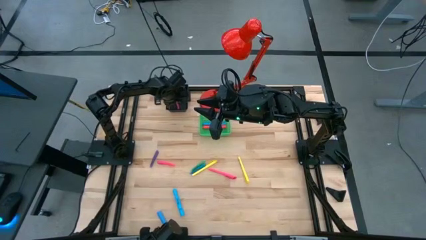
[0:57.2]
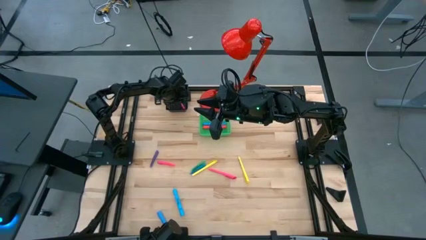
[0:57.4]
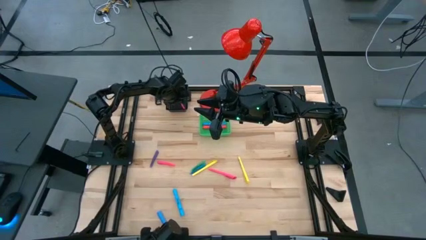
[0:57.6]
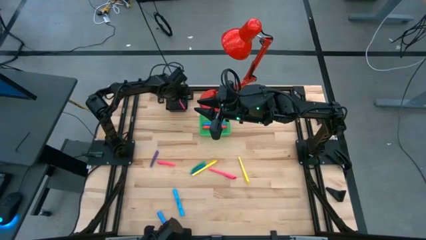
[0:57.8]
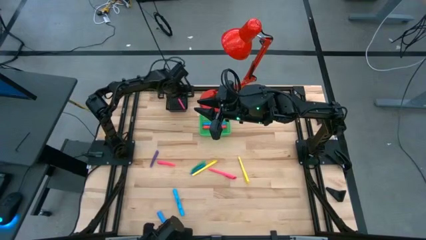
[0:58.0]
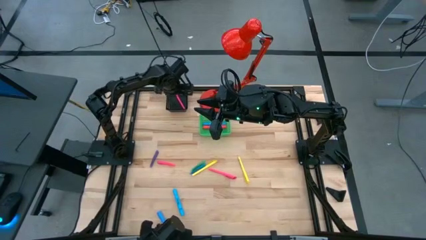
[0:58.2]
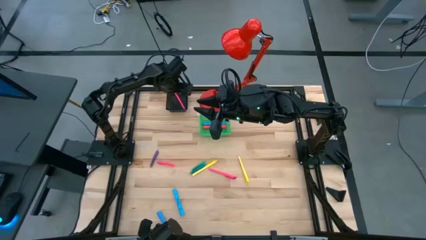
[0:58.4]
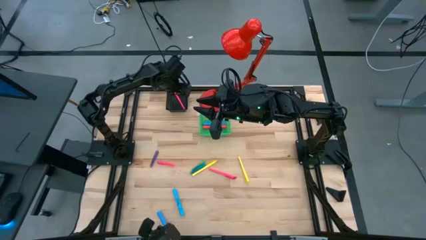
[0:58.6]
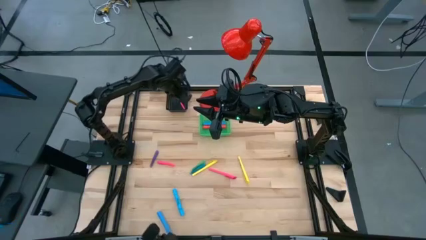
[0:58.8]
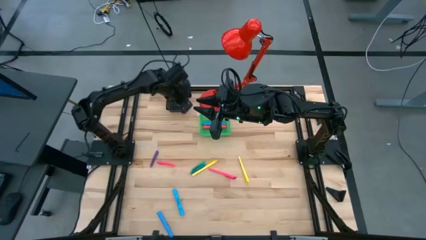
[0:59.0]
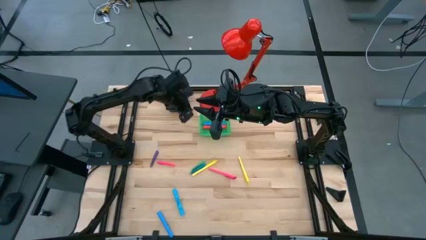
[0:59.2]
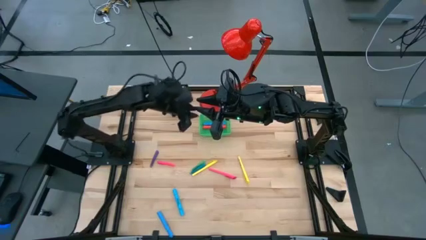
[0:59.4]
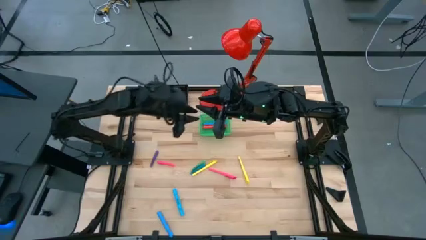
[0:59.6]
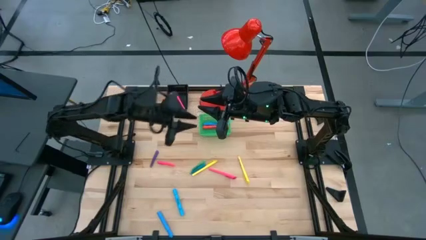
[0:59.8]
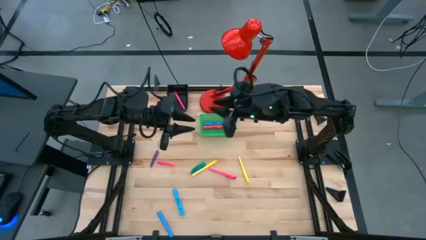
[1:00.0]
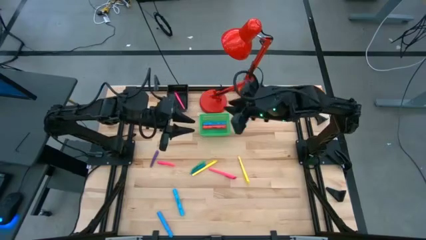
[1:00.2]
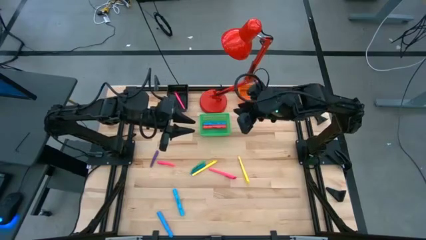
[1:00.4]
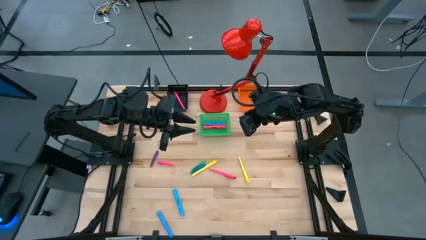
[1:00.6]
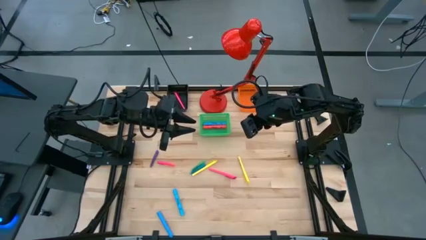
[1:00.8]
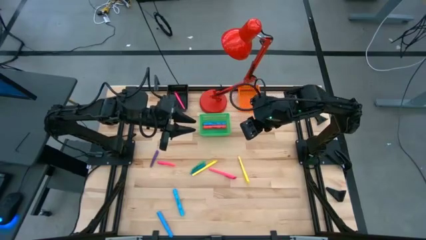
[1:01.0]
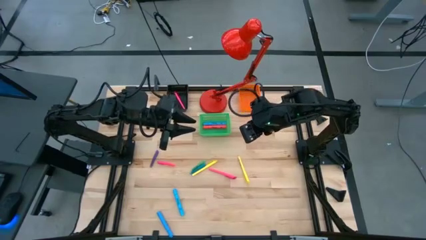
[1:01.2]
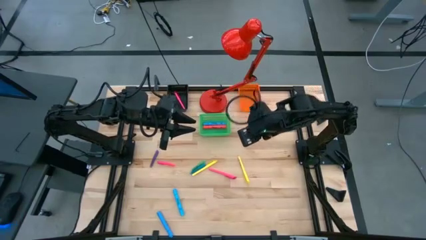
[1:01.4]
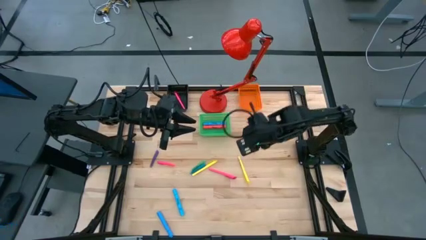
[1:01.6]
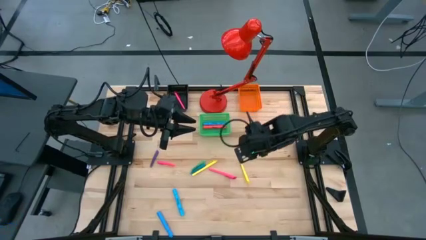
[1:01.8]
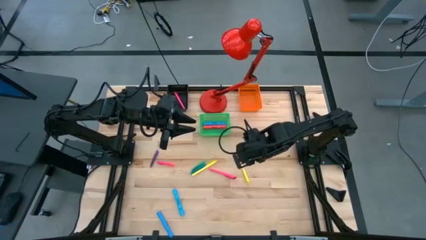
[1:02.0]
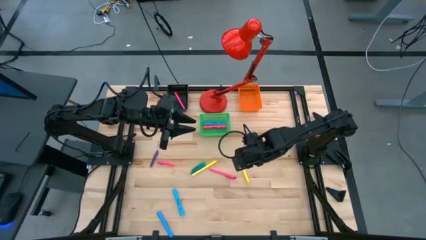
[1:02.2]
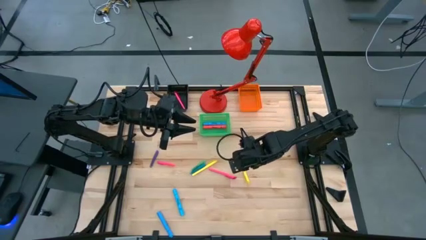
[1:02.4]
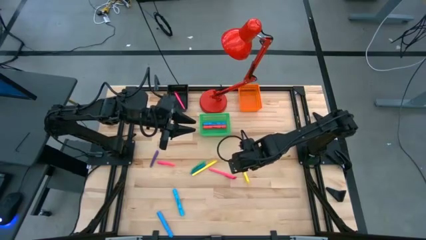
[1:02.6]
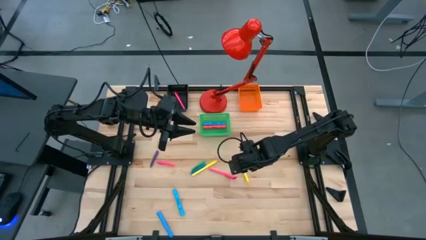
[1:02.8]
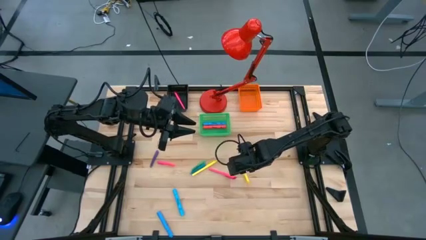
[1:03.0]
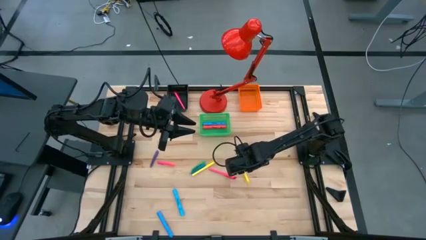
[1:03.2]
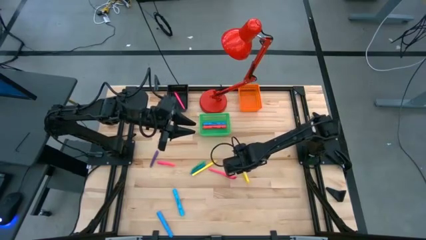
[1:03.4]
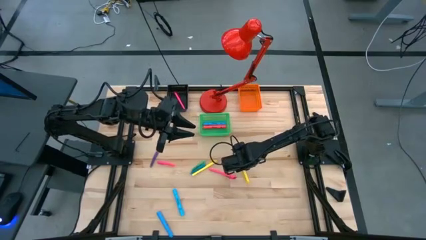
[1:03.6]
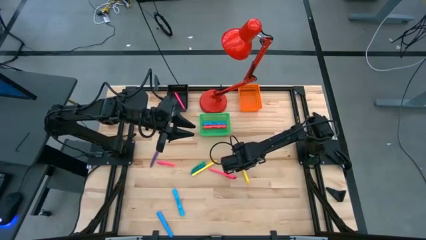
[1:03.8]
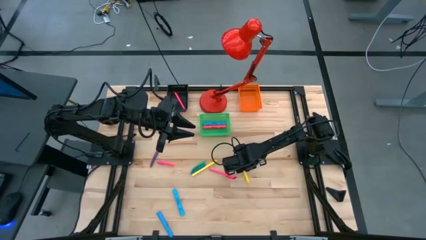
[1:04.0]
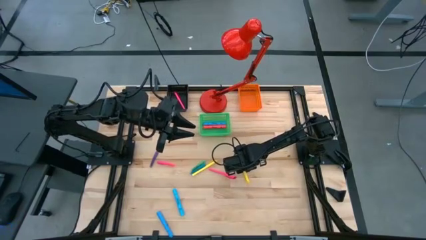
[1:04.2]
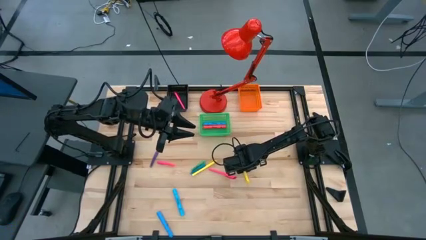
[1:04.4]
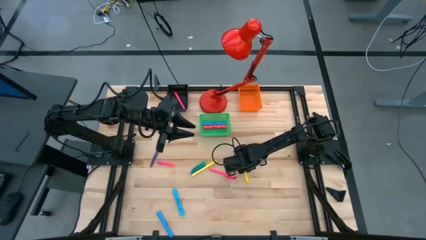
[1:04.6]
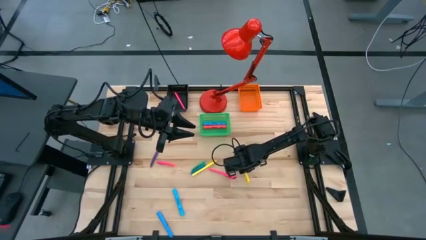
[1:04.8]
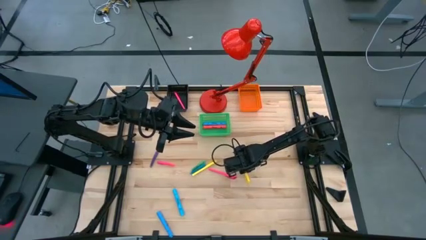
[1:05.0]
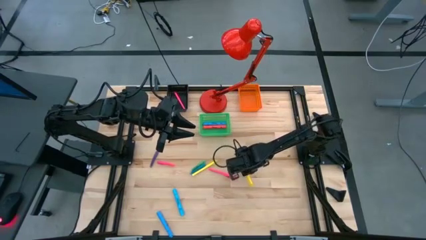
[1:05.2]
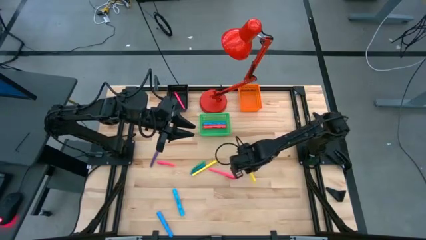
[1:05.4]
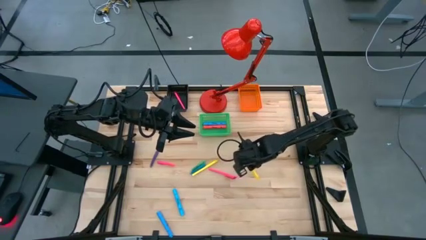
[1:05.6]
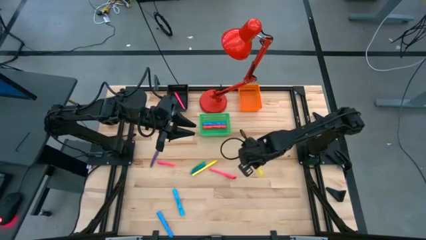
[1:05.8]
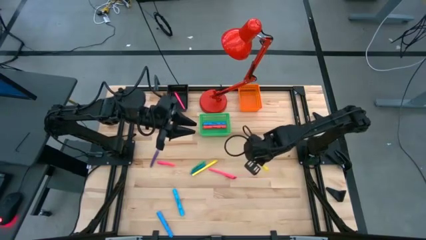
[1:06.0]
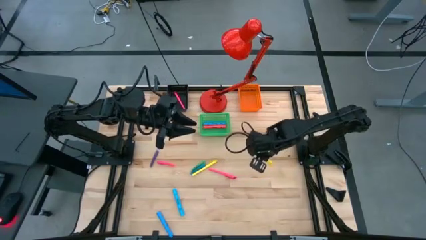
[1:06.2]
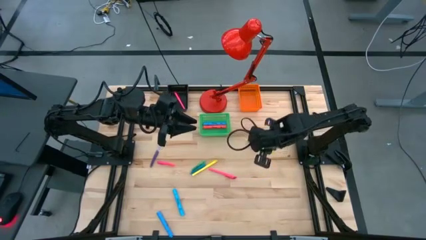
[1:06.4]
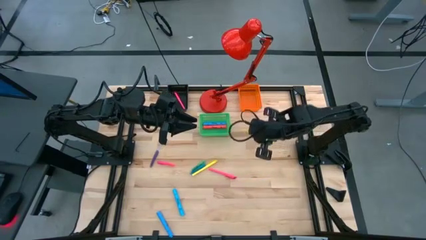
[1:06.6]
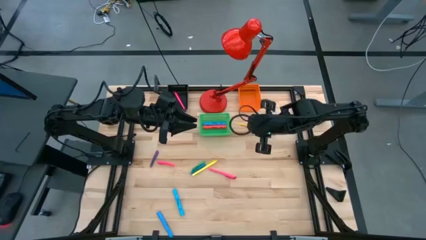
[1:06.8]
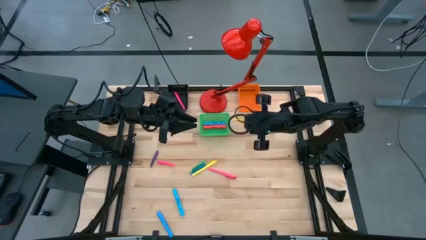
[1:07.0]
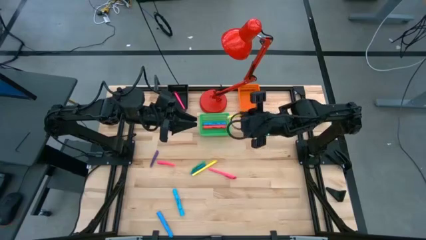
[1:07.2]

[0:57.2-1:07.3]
Task: Pick & Place Markers
Put the yellow pen into the black basket

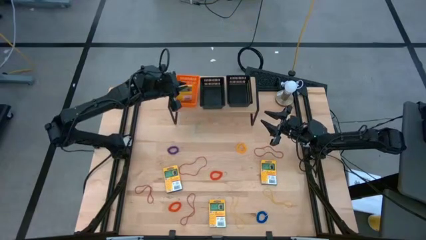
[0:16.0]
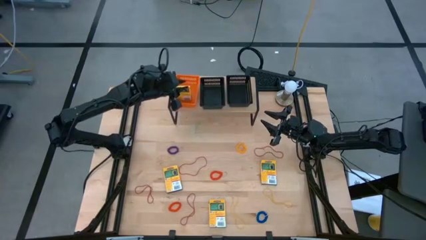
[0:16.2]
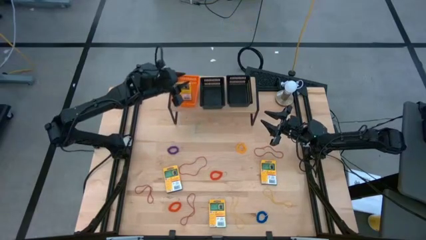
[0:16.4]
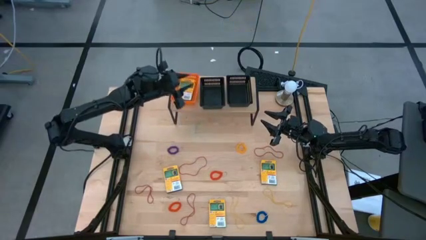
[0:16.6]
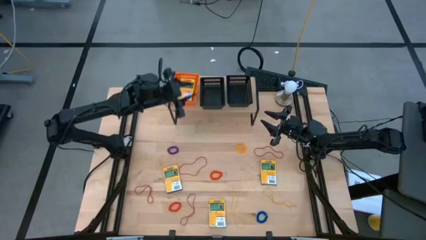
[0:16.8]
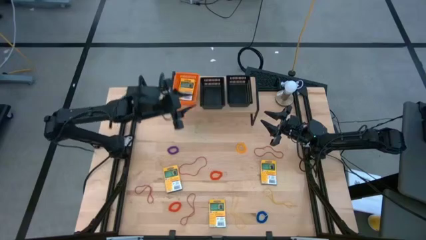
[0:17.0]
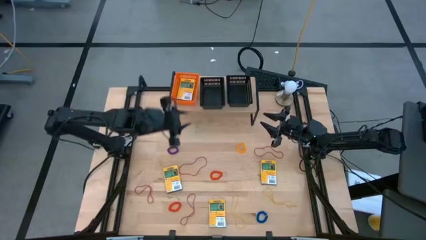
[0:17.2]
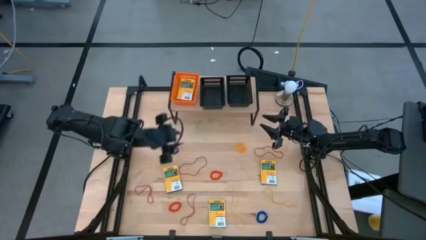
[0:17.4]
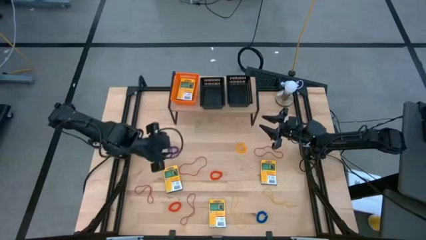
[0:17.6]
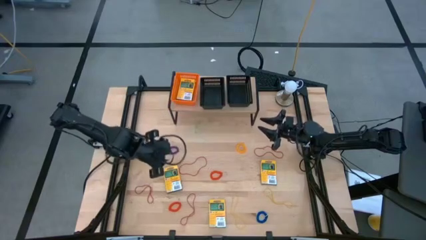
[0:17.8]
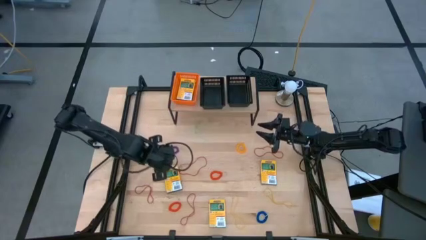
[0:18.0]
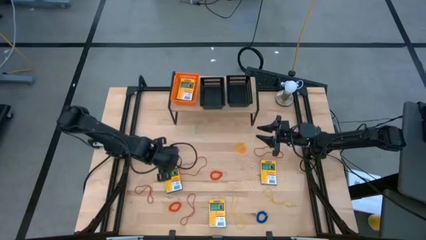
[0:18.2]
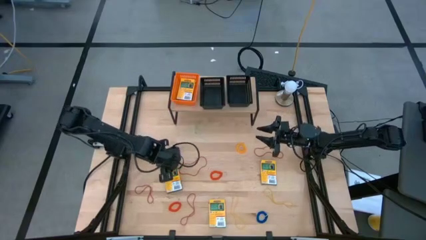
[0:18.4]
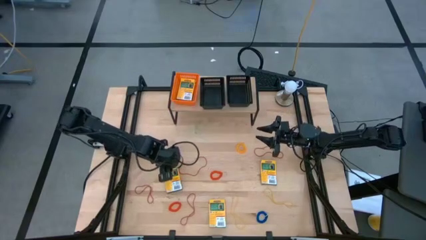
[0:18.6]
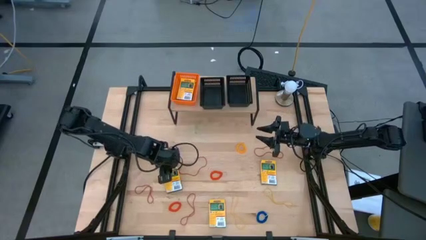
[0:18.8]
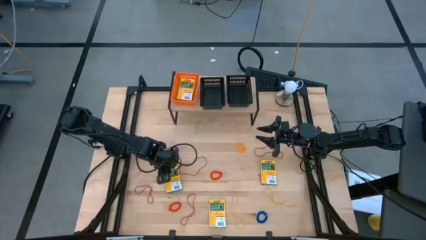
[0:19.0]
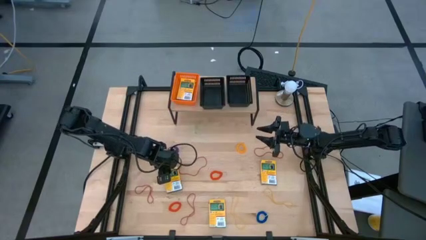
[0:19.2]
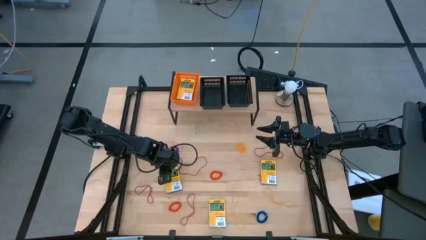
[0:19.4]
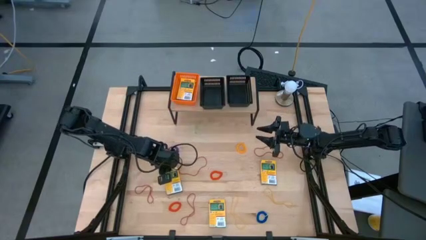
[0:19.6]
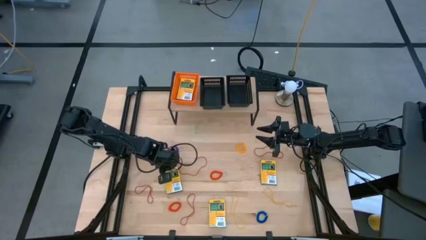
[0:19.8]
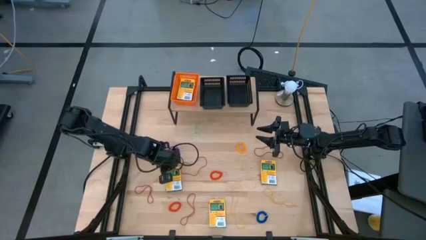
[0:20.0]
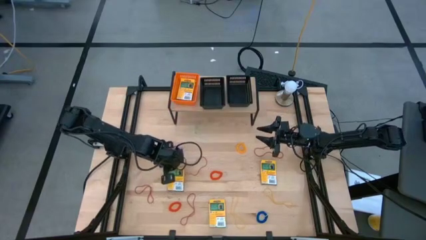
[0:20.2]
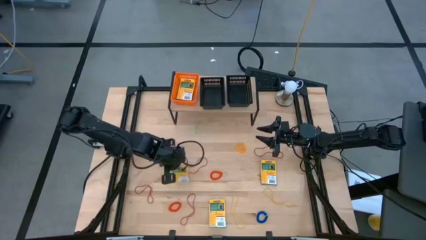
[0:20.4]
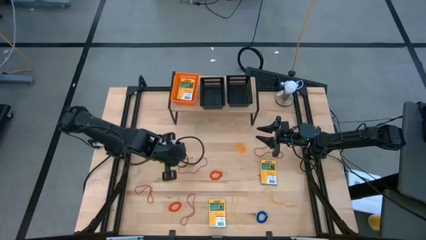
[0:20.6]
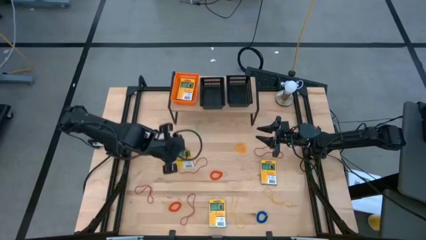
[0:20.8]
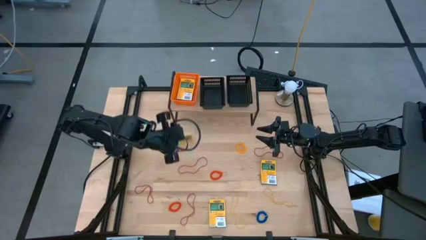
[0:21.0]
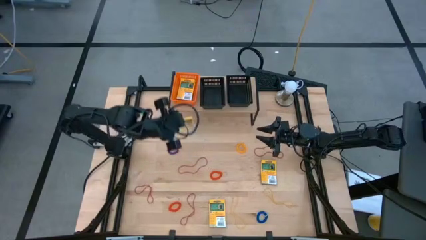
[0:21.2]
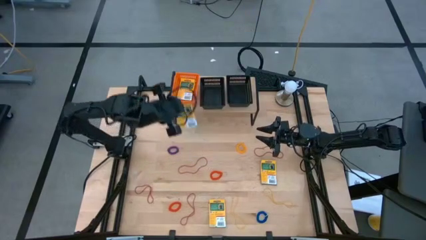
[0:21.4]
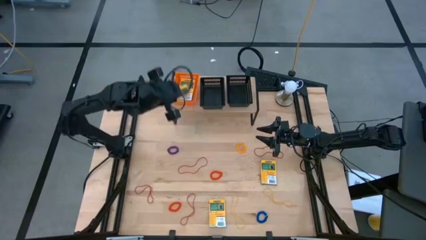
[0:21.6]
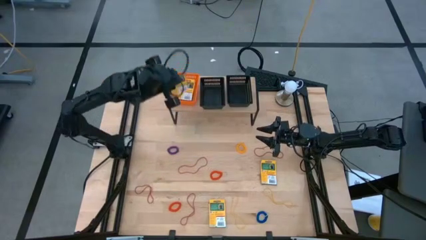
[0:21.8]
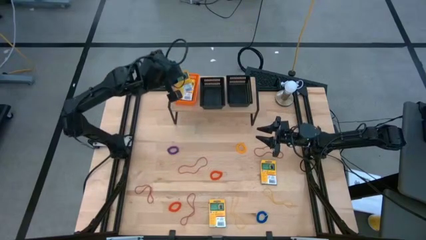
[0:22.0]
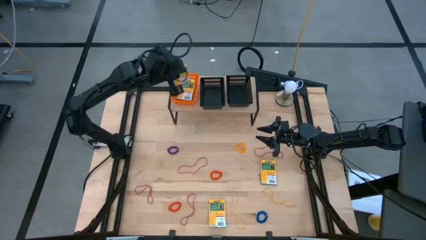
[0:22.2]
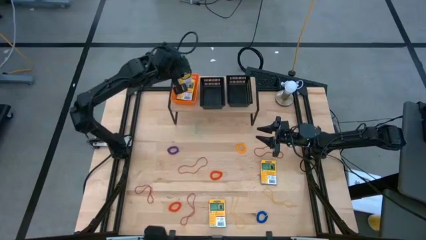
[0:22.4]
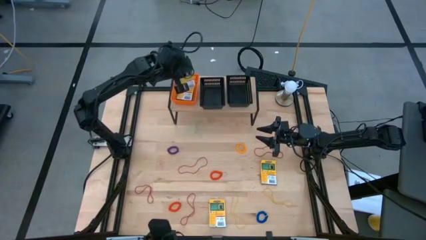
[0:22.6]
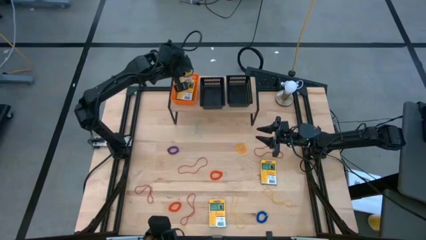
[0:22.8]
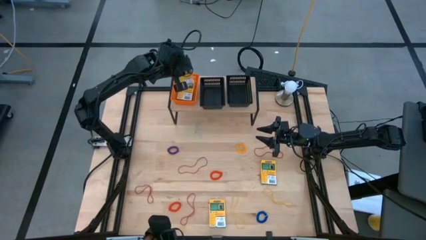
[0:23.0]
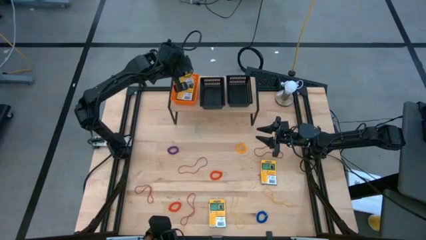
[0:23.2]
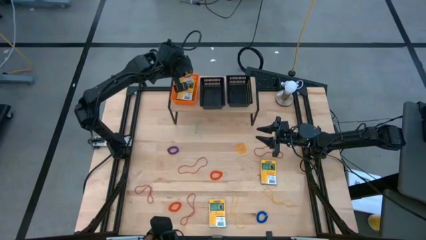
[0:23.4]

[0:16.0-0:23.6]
Task: Pick & Place Office Desk Supplies
Put the crayon box into the orange basket on the shelf
